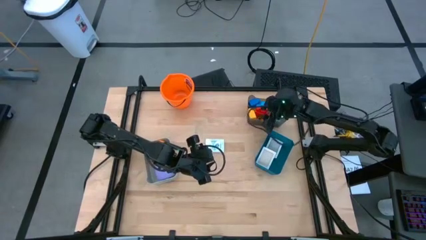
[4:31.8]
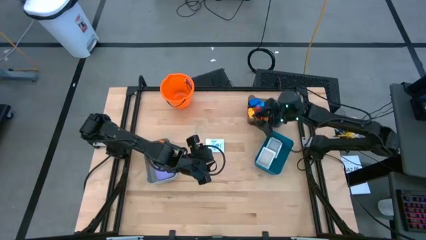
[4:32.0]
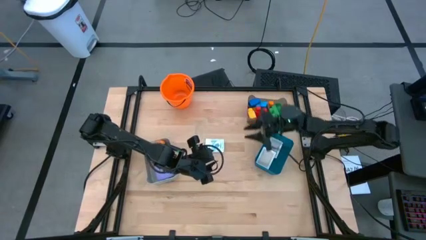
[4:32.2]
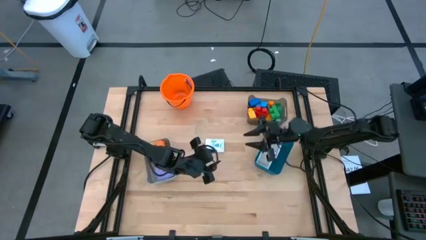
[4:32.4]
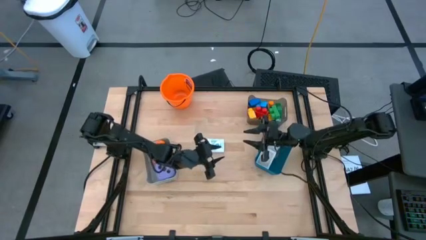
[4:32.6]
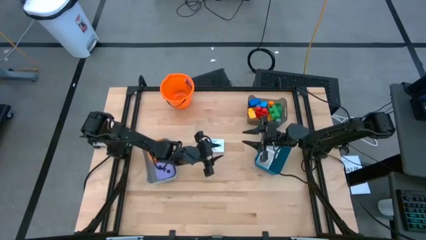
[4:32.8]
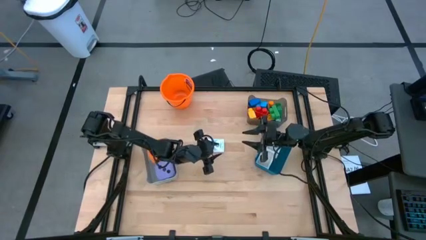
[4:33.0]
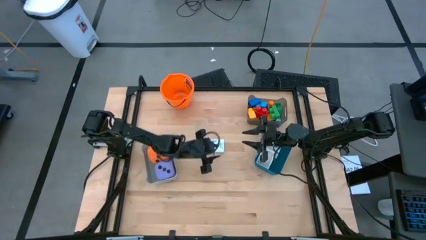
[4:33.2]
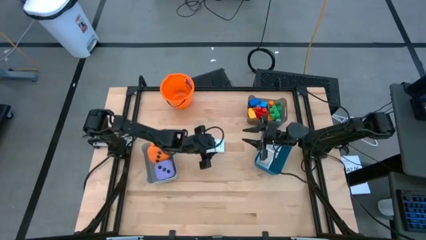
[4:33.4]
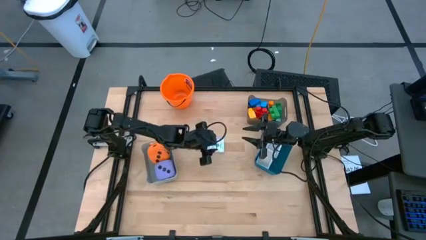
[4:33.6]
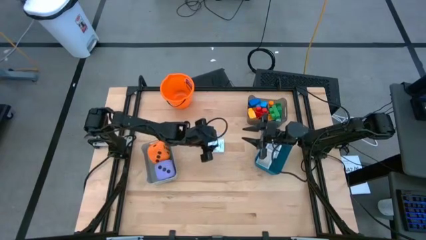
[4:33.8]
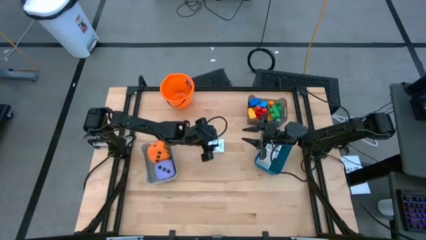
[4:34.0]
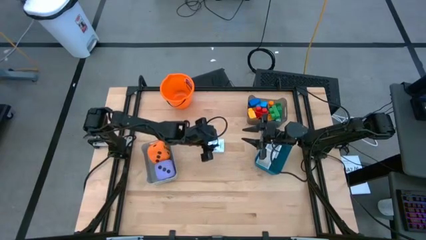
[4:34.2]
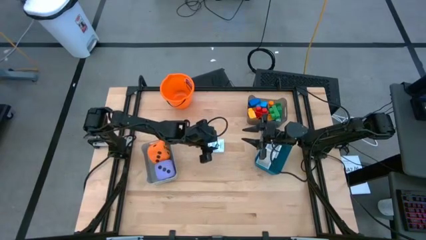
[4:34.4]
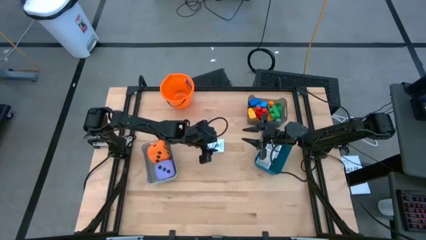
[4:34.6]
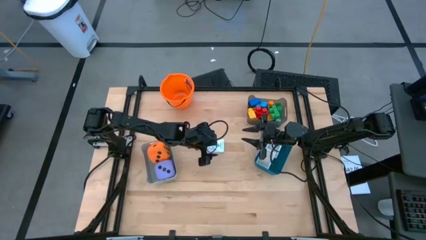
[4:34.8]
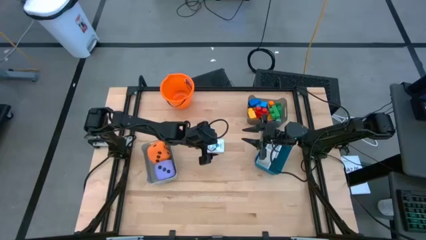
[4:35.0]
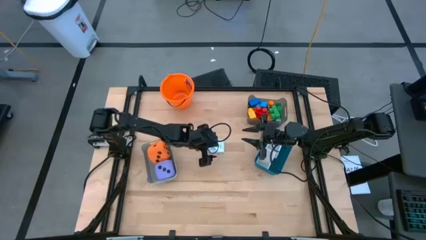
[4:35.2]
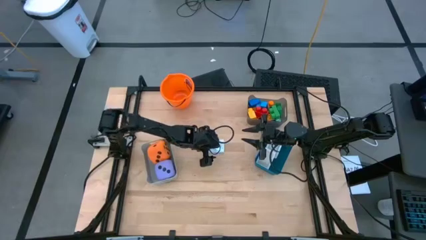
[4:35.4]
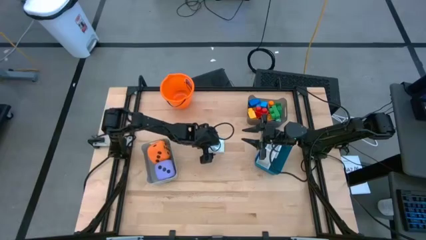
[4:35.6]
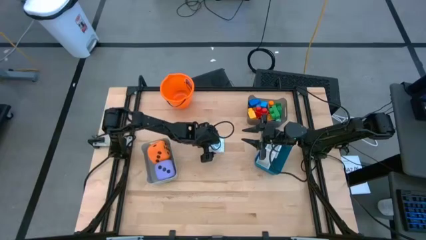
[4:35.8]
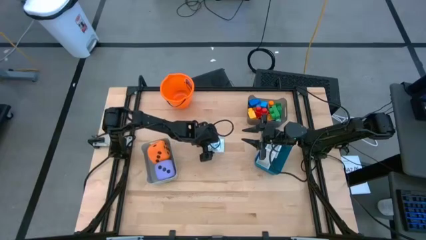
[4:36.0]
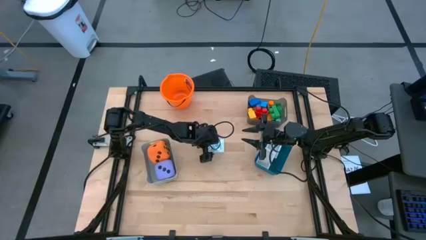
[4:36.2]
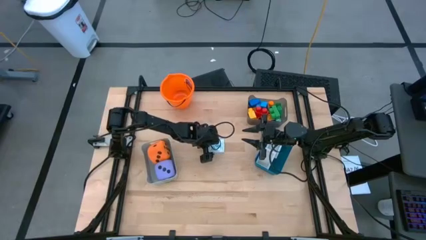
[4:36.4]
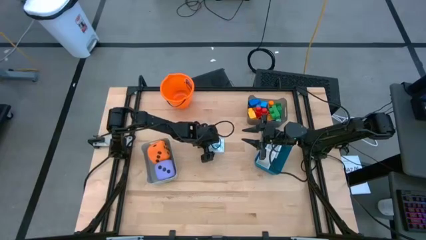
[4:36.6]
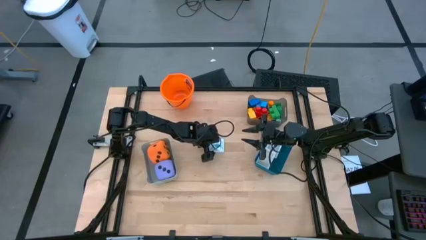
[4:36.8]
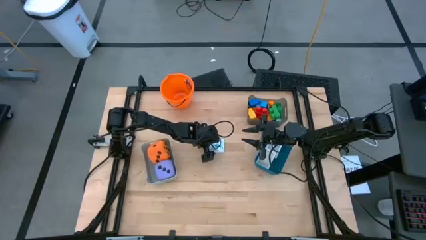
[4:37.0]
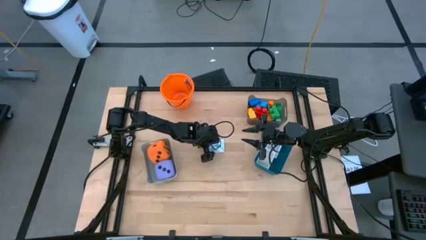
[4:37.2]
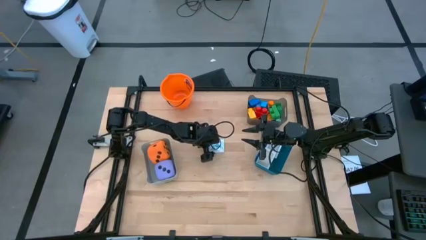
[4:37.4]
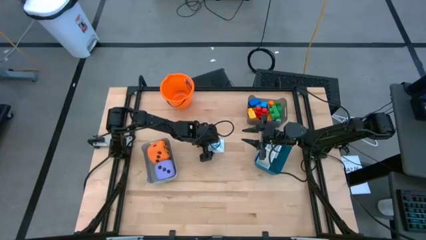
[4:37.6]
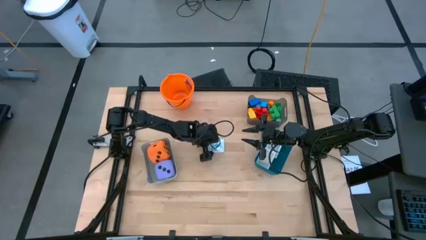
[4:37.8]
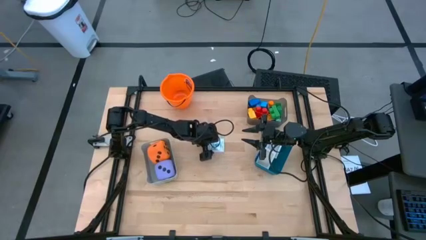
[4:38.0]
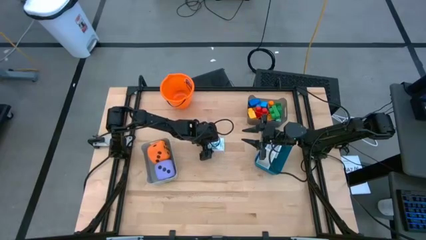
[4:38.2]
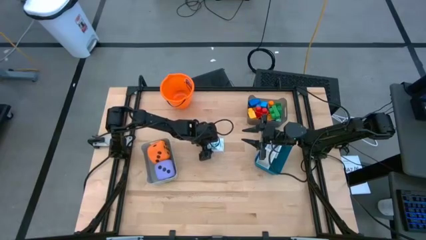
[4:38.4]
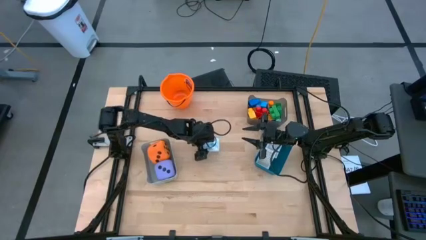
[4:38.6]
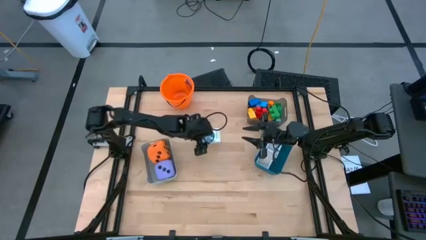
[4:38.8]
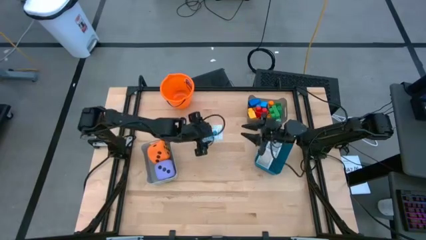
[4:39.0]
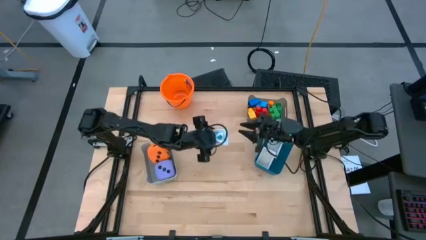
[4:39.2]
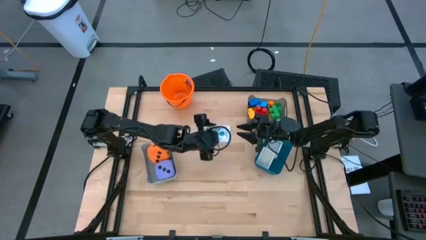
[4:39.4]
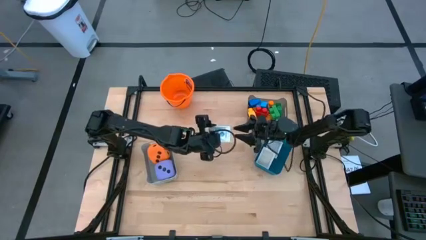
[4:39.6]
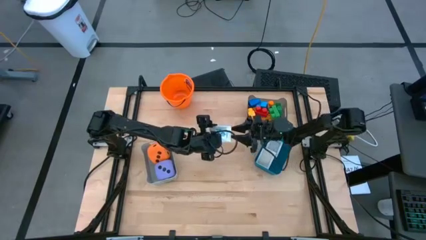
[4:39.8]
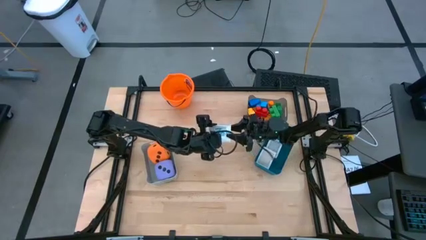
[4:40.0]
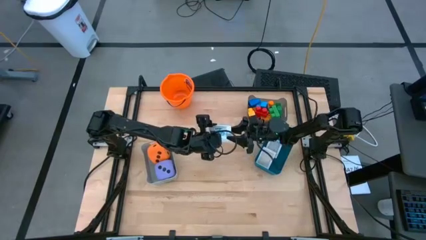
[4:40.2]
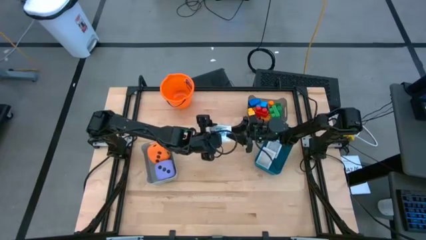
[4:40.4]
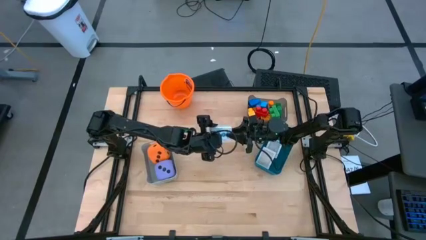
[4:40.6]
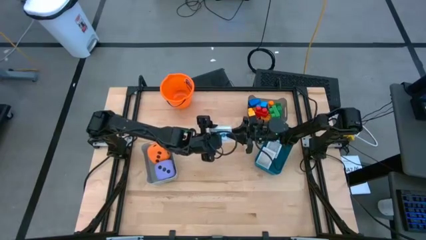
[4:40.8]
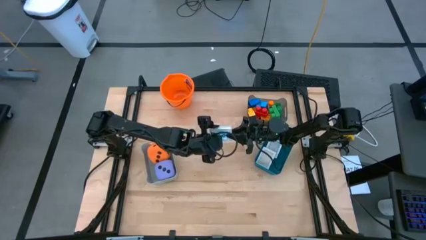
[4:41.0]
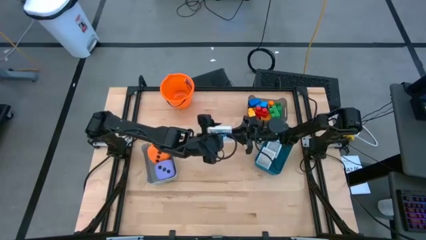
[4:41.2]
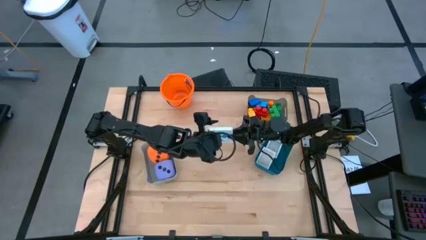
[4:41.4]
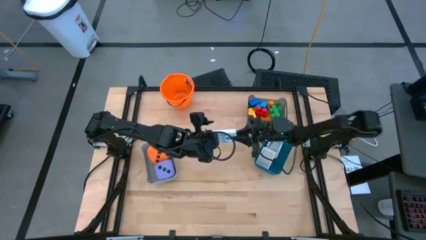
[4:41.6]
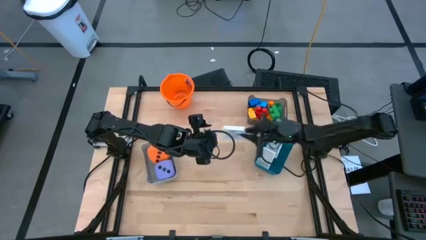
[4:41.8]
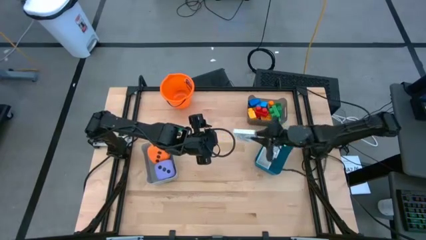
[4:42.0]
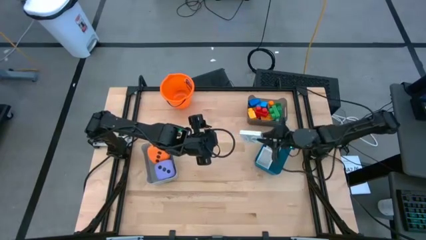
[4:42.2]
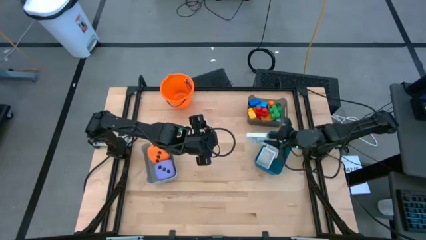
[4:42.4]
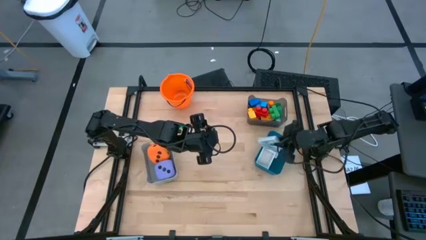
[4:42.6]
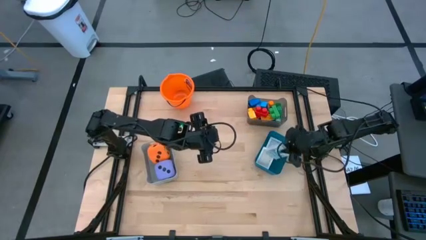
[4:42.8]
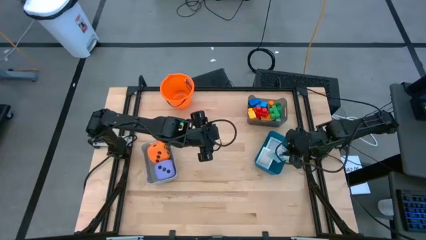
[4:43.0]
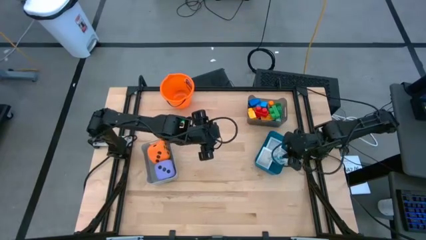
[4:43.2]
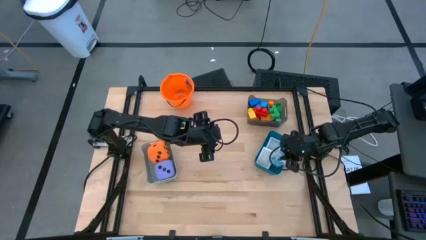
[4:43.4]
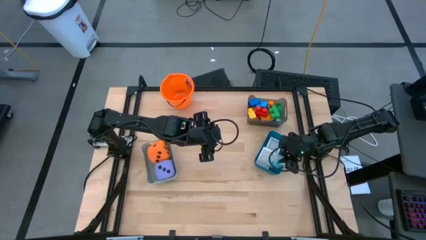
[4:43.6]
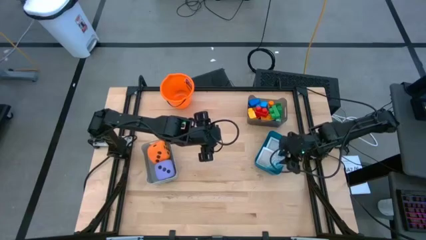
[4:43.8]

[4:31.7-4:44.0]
Task: Pick & Place Toys
Put the blue deck of cards into the blue bin
